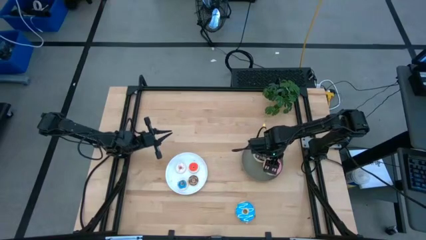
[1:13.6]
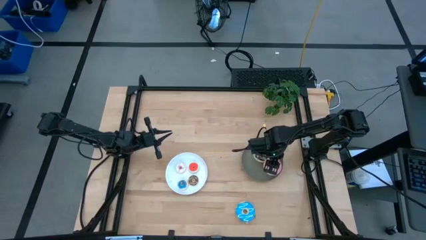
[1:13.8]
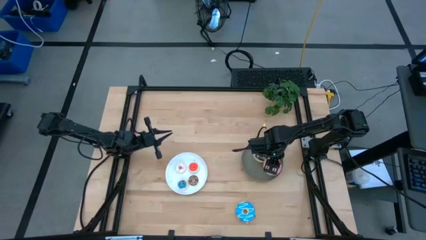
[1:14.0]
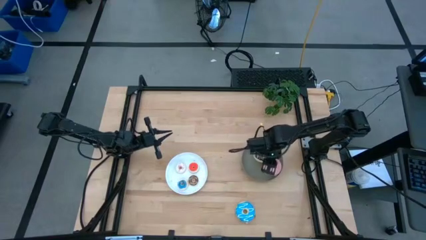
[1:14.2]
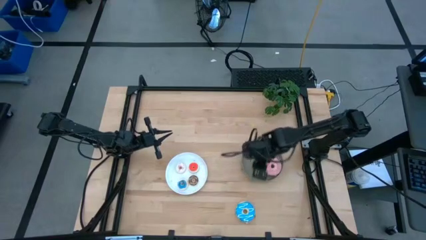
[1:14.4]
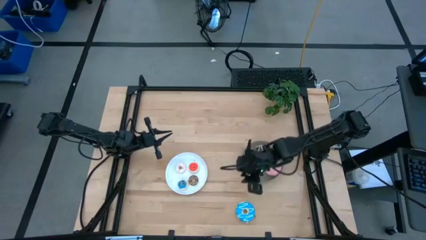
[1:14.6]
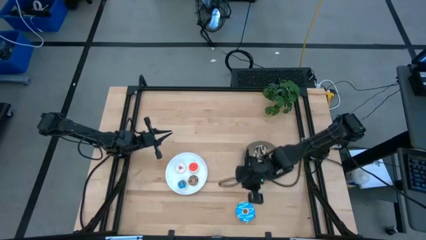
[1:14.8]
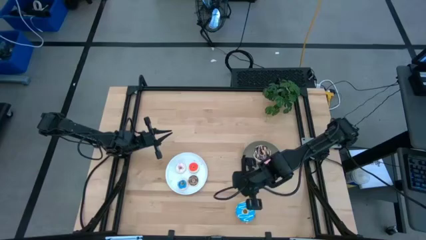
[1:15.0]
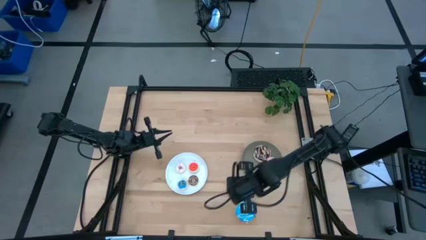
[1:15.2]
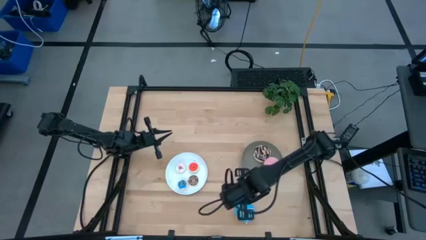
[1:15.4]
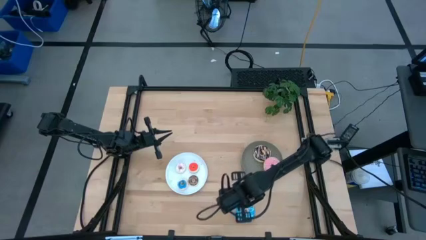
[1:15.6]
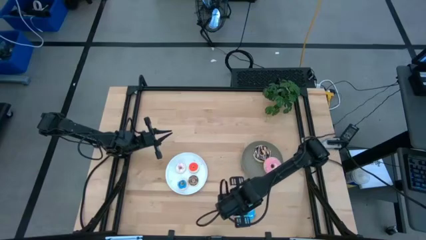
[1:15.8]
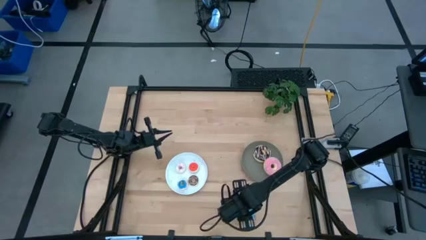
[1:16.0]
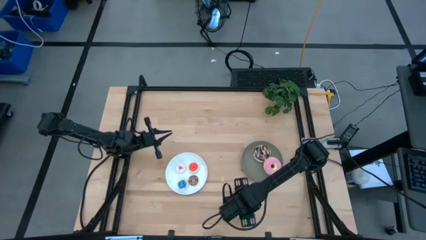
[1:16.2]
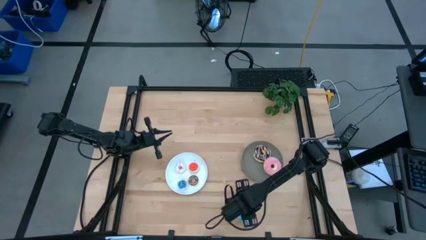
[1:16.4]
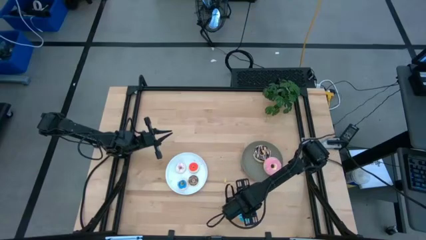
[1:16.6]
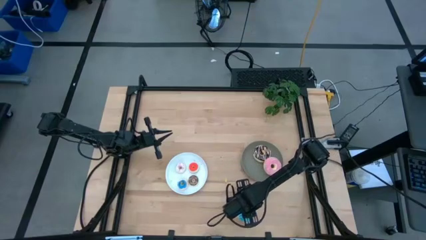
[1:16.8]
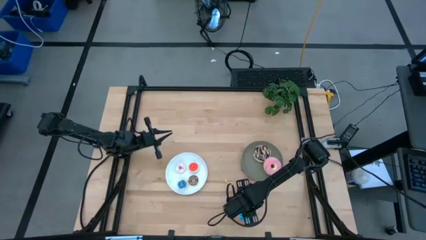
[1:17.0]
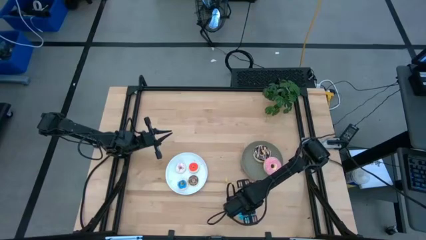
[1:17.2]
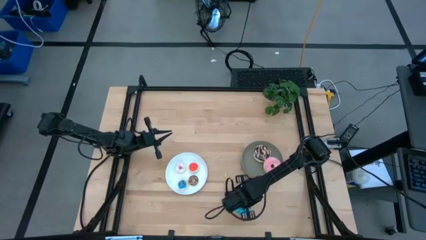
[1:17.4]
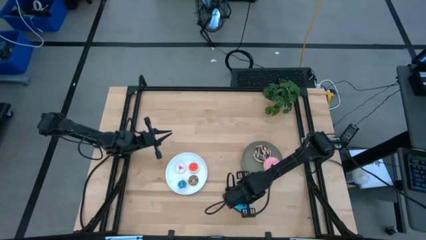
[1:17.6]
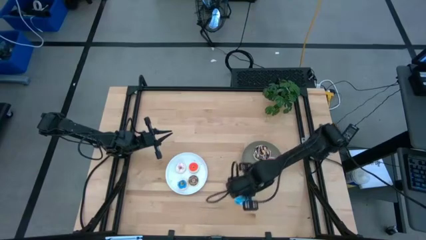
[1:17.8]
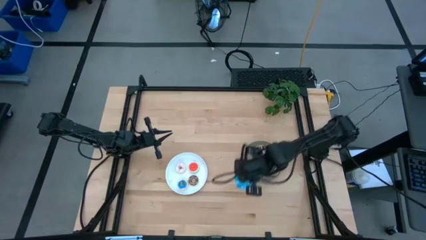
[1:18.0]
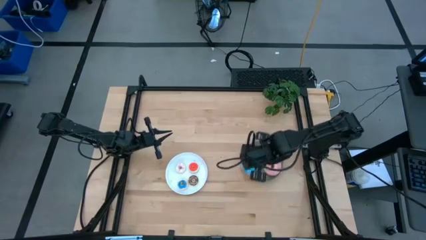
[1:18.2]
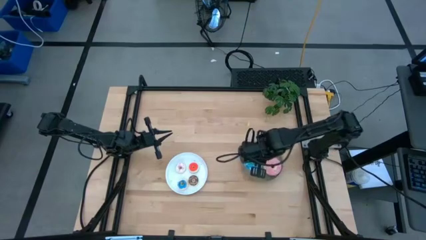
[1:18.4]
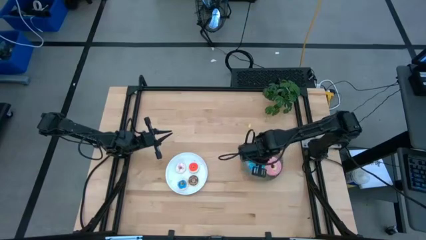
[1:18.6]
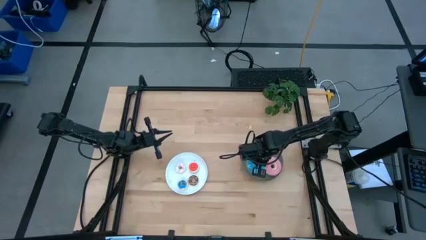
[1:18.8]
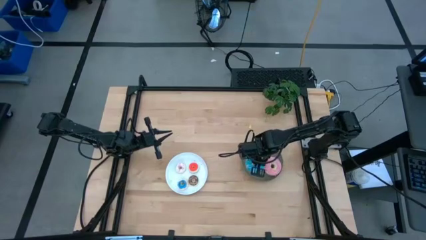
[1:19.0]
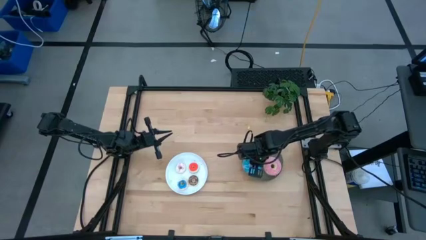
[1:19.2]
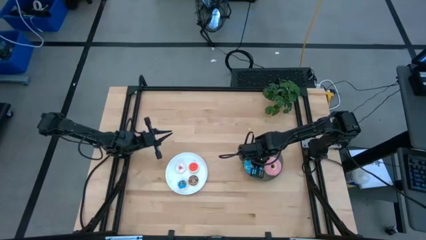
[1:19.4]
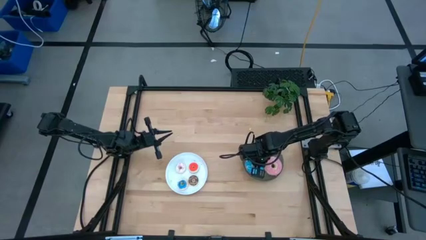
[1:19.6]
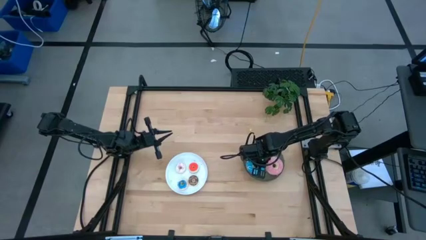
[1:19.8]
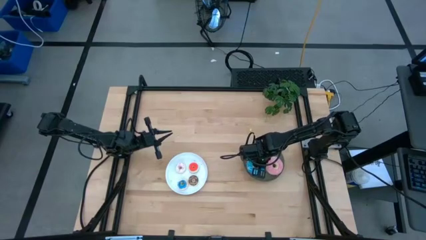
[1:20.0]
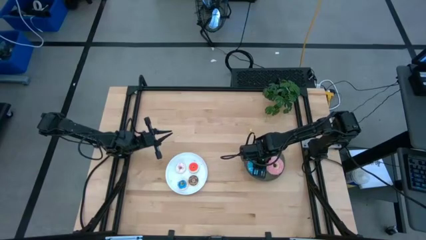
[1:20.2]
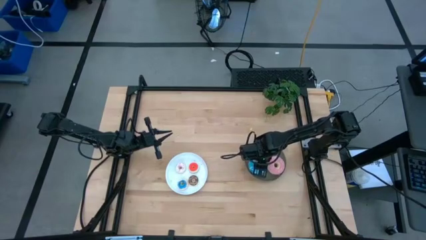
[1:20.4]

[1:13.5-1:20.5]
Task: Pick & Place donuts
Put the large light blue donut on the dark gray plate

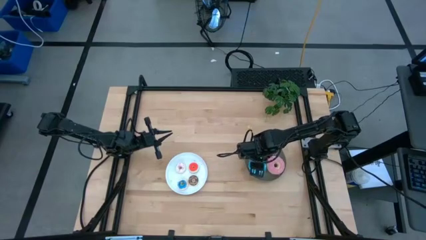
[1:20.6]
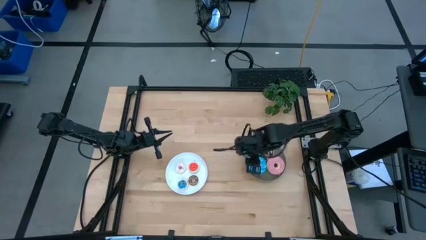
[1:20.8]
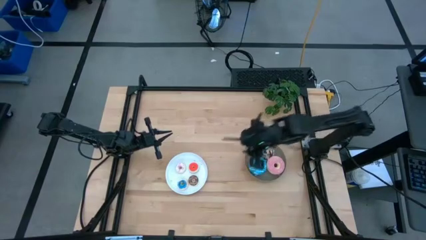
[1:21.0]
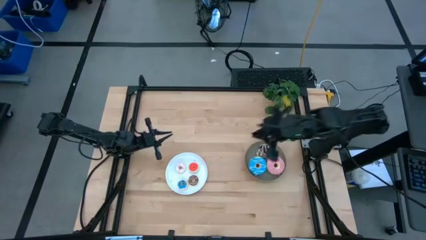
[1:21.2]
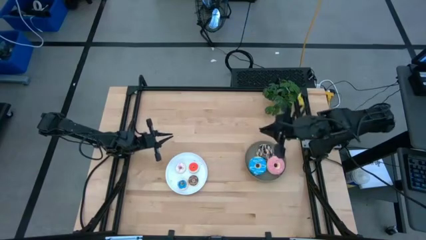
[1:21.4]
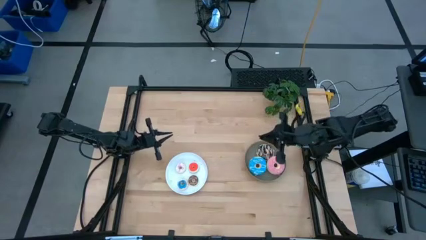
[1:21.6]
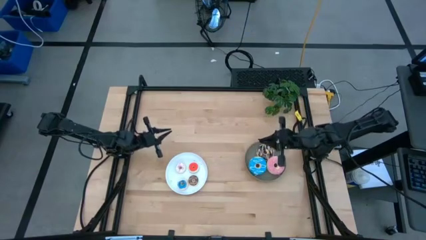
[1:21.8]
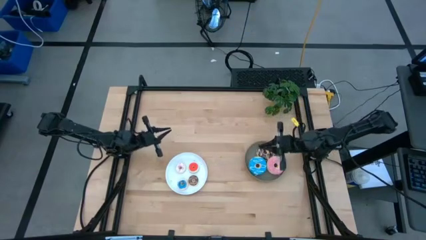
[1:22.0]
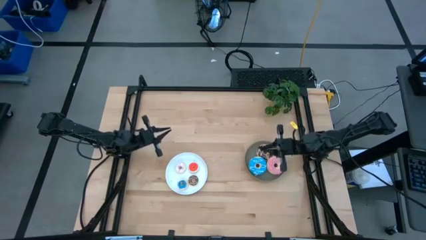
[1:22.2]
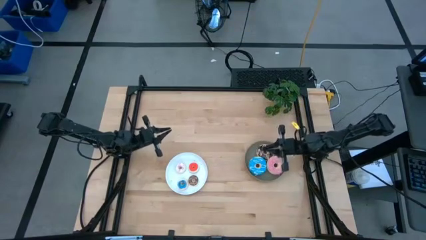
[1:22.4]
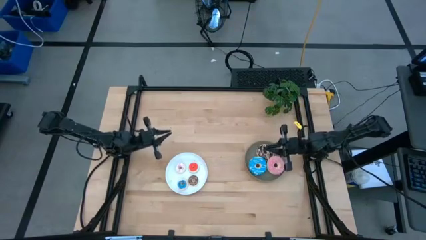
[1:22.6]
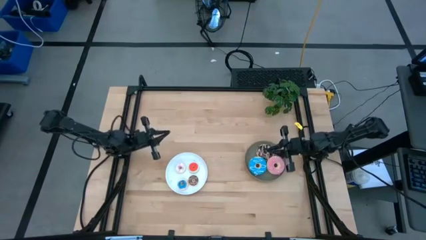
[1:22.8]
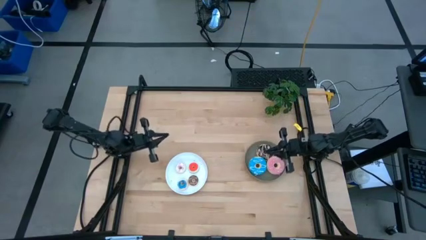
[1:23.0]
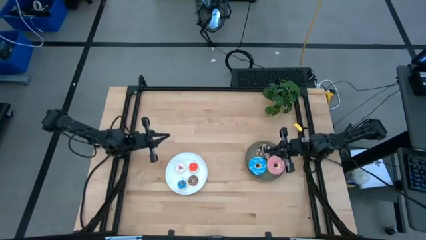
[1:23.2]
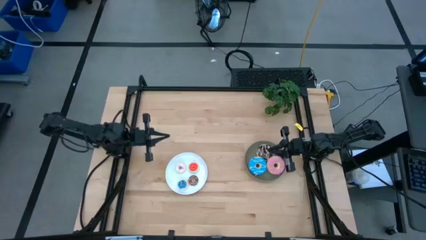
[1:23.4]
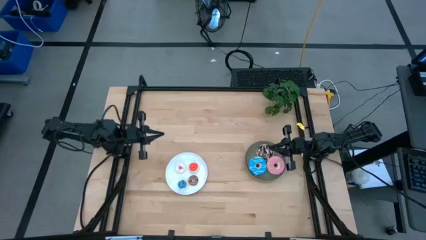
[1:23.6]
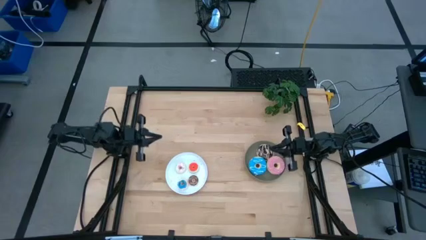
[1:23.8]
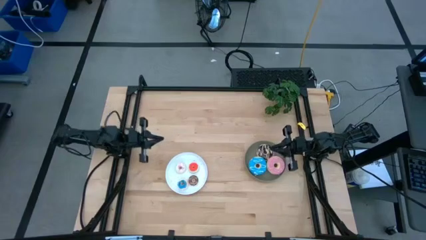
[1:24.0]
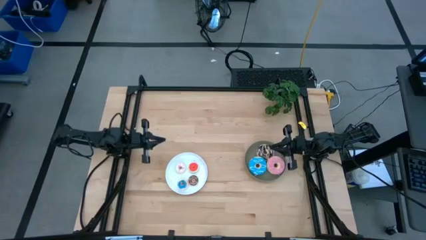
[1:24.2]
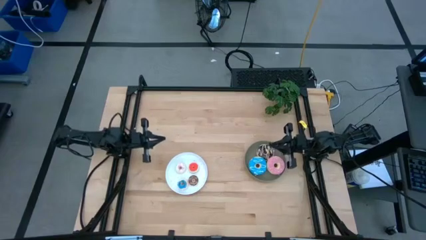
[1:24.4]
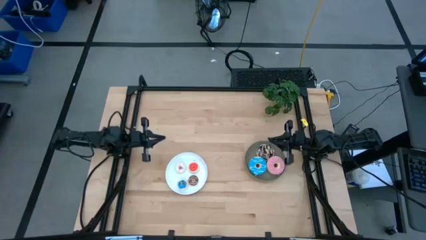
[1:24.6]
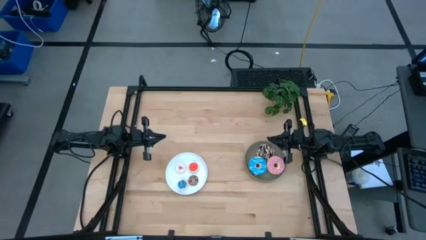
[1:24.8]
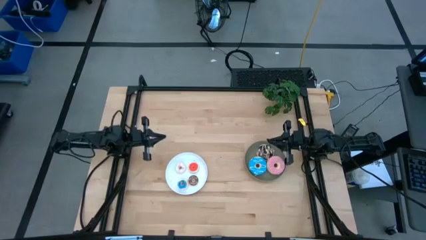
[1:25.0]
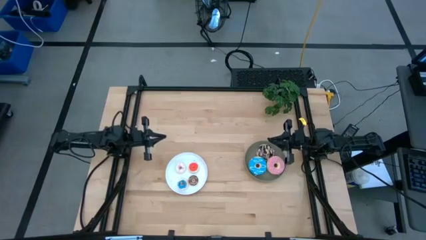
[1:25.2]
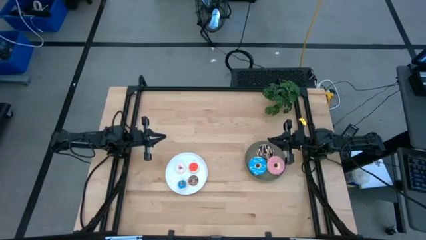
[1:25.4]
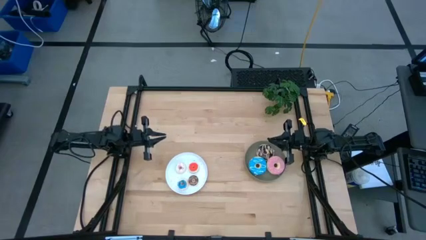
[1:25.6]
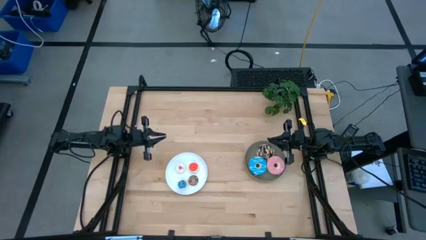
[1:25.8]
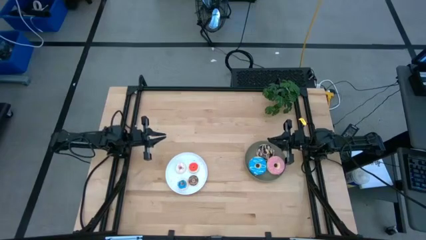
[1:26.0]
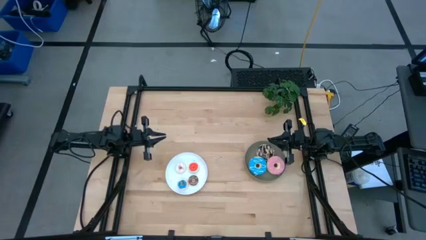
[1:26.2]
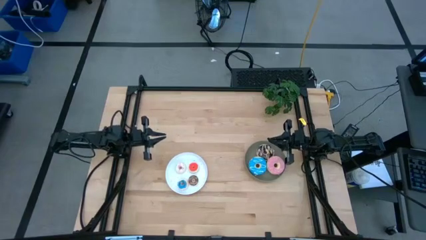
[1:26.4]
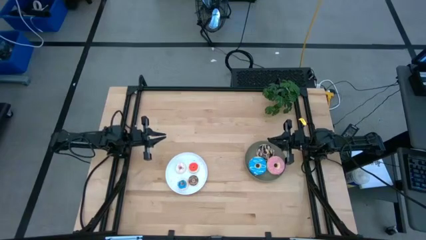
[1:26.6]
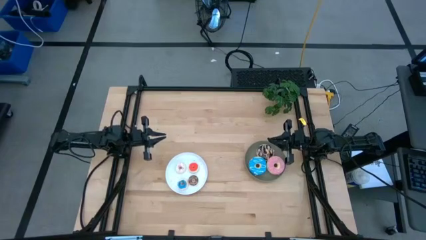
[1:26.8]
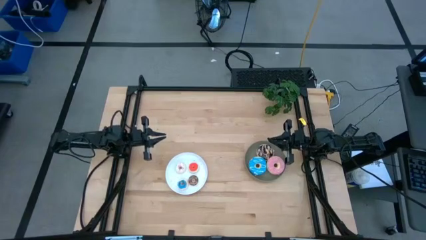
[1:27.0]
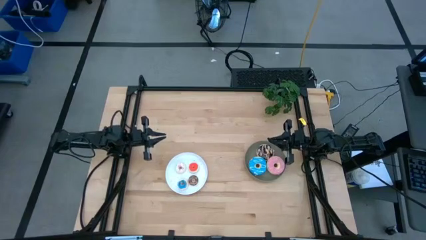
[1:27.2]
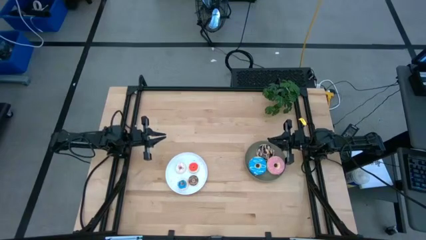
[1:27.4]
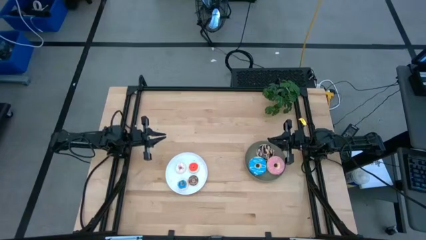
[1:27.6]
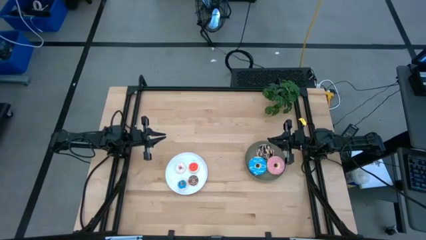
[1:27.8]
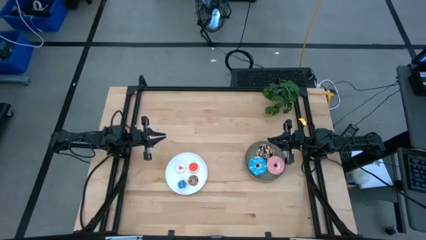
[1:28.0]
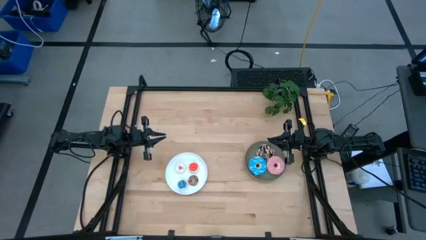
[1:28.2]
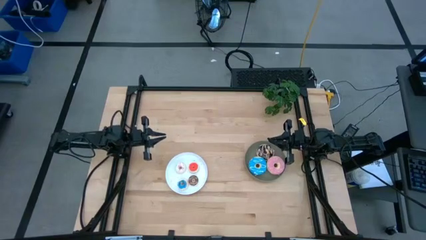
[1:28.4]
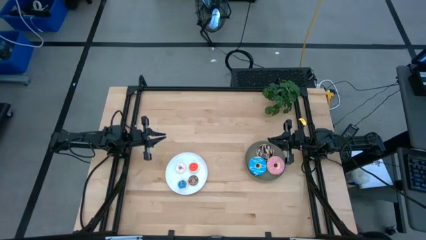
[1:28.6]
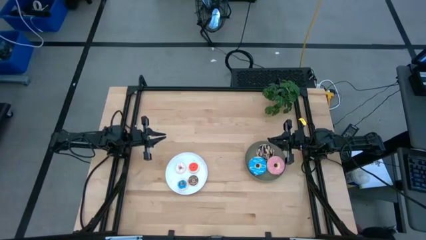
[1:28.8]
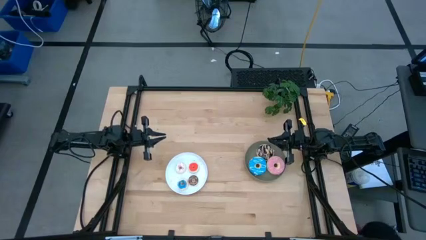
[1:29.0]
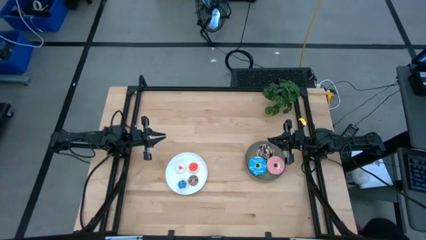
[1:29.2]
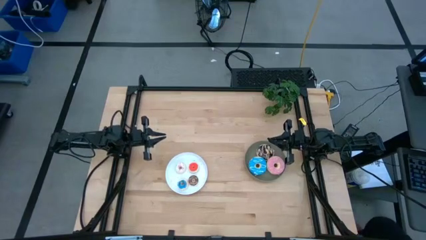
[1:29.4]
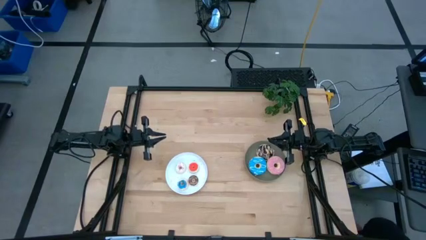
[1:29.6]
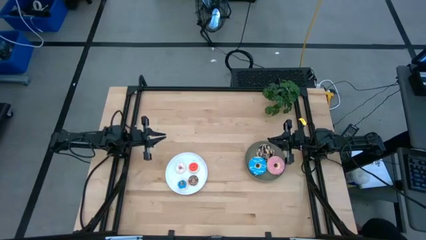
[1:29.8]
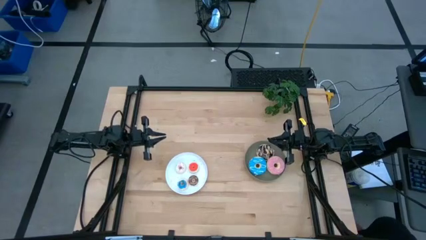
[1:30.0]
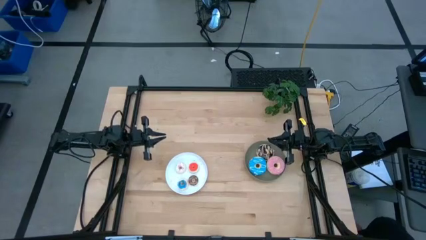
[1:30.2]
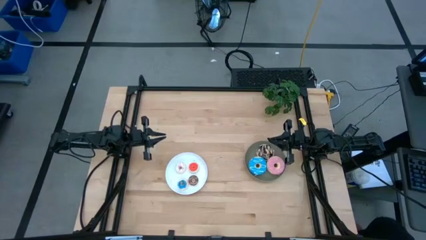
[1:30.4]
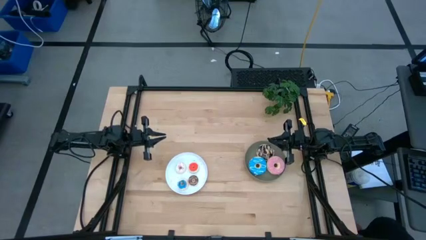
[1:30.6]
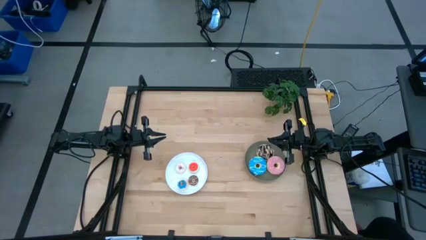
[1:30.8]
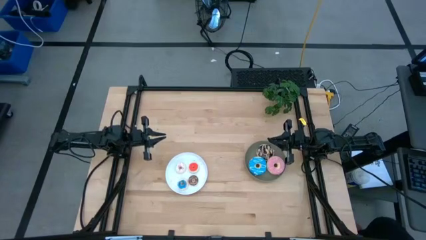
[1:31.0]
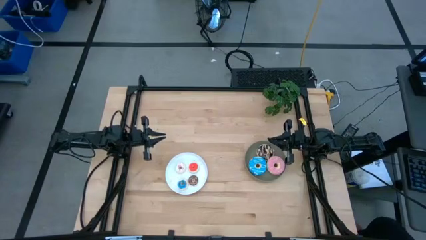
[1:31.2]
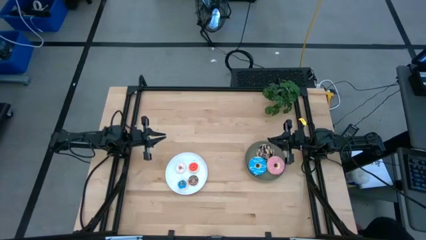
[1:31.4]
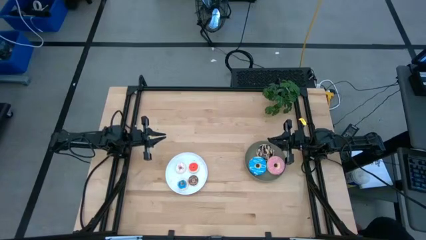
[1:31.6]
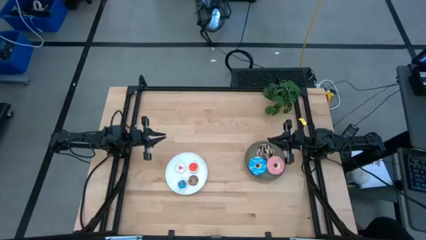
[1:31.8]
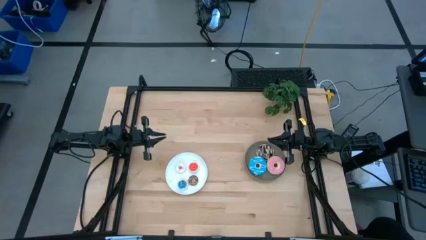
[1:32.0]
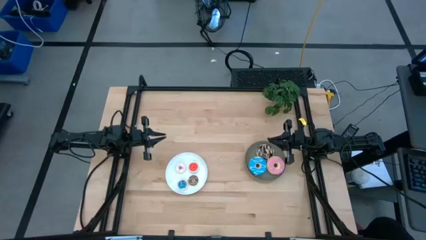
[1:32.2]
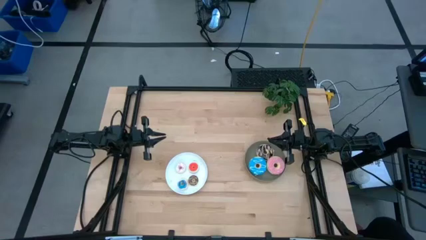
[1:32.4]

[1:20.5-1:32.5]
Return to Home Position
